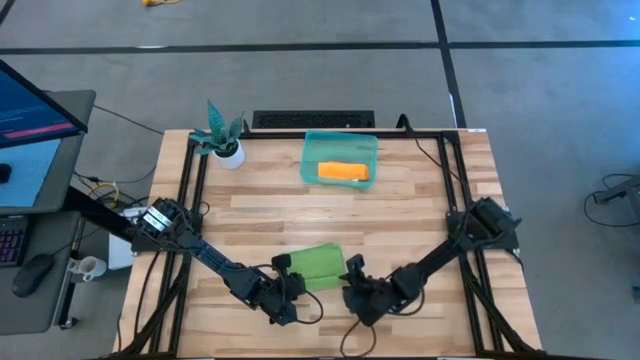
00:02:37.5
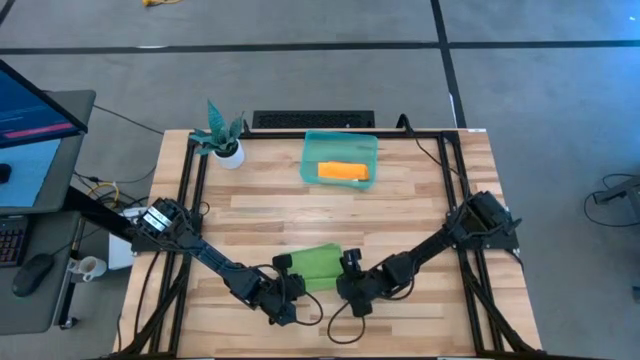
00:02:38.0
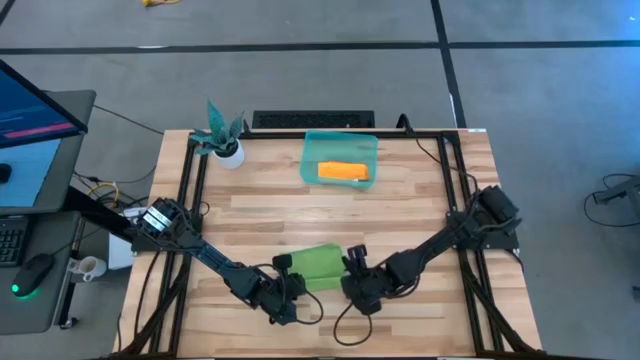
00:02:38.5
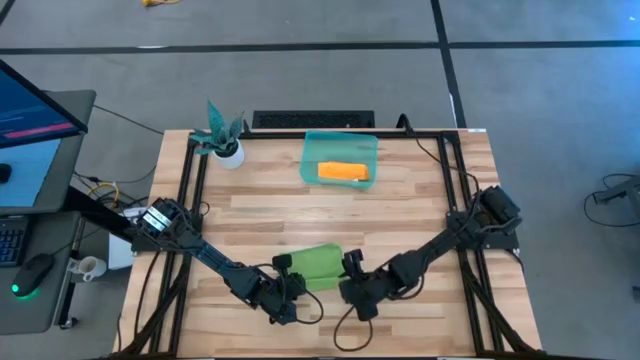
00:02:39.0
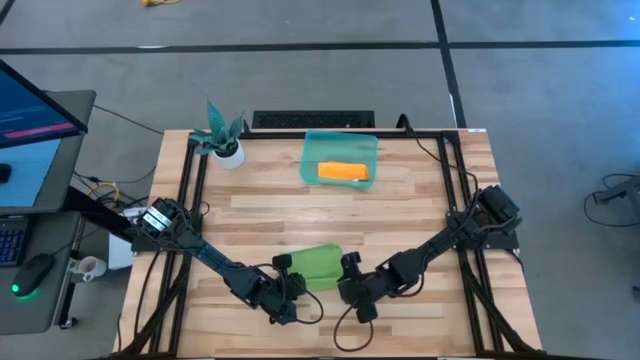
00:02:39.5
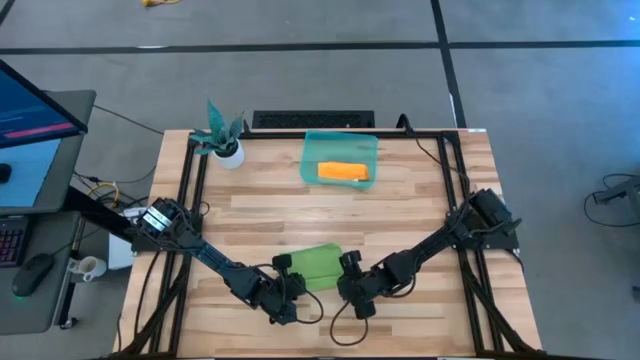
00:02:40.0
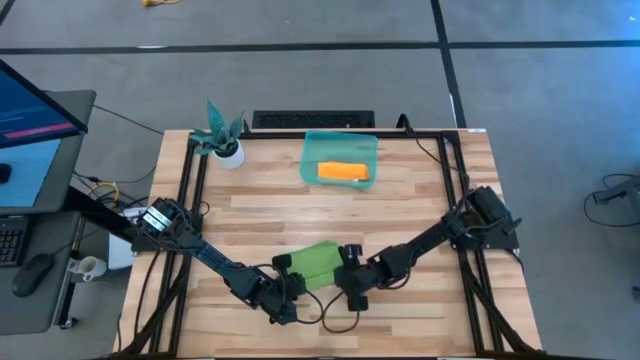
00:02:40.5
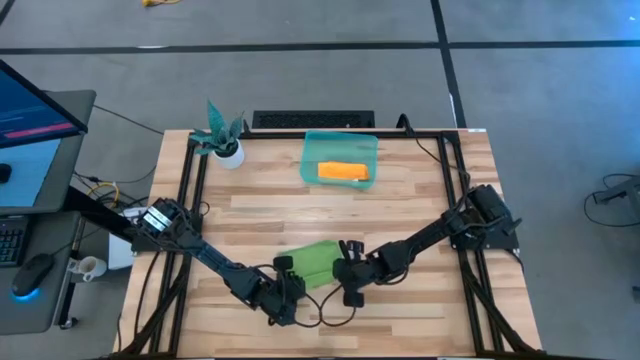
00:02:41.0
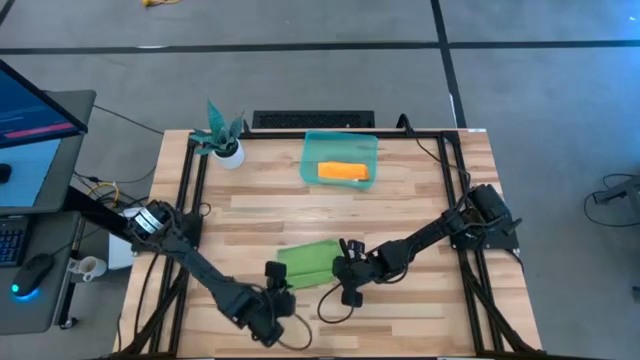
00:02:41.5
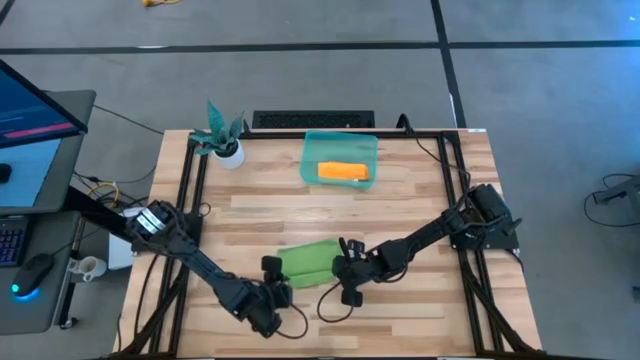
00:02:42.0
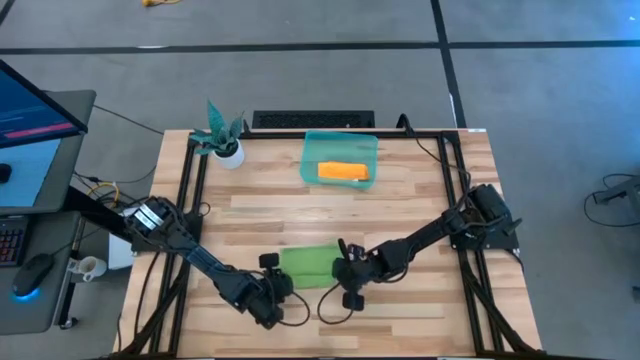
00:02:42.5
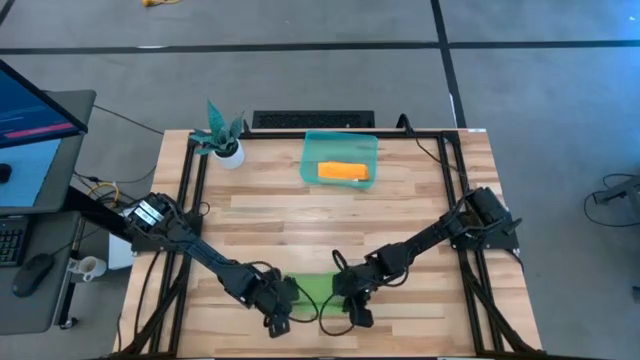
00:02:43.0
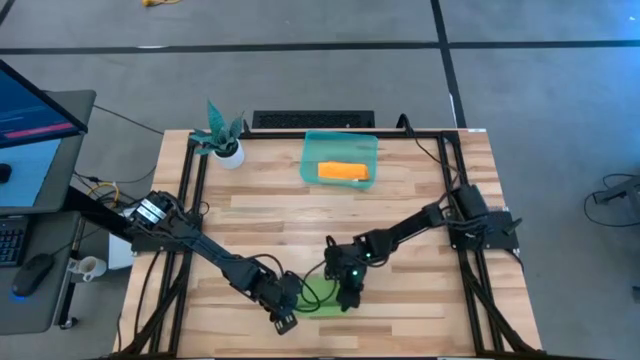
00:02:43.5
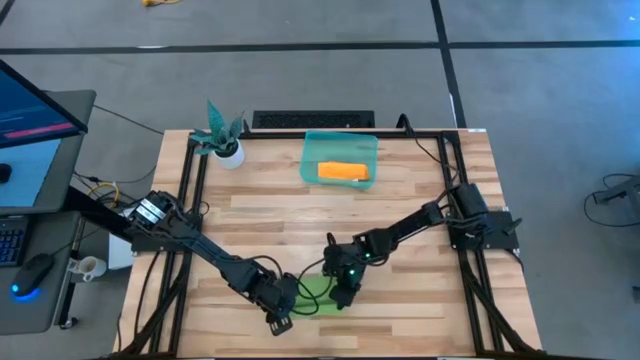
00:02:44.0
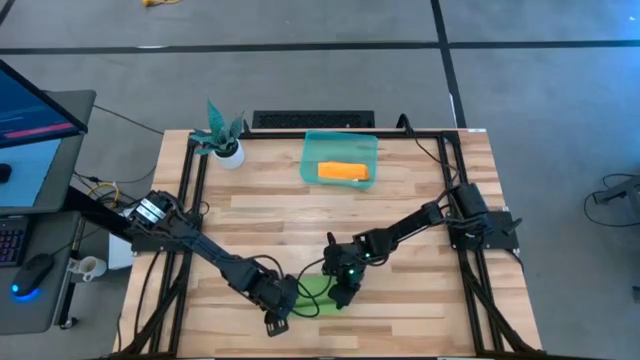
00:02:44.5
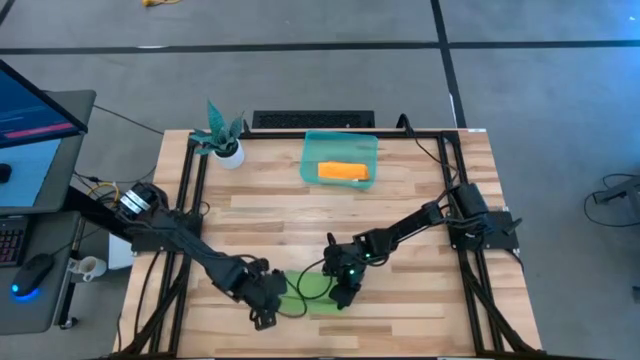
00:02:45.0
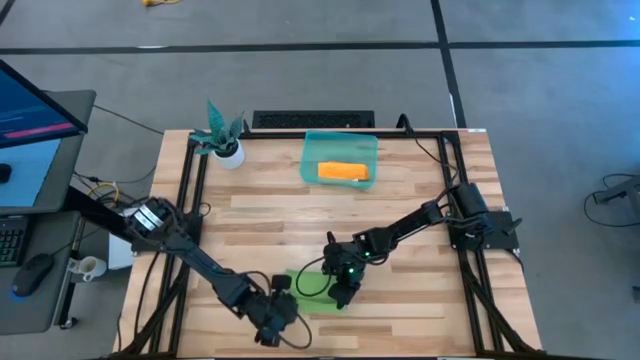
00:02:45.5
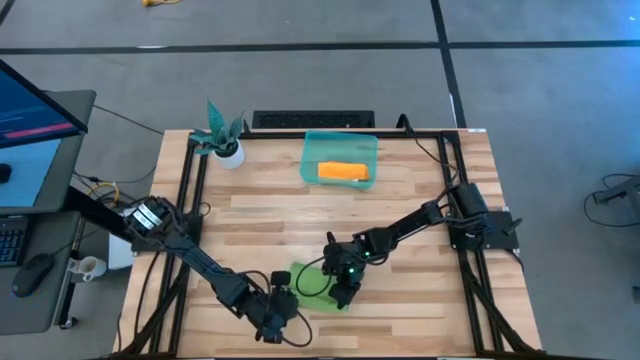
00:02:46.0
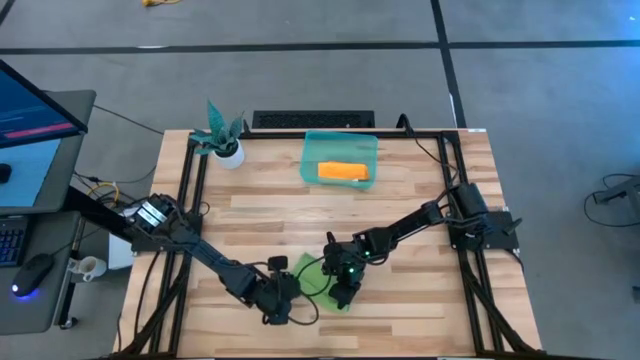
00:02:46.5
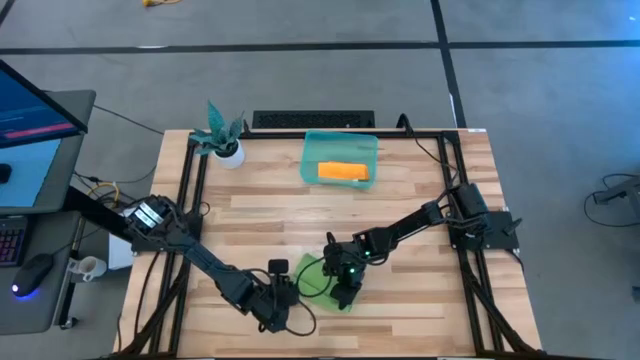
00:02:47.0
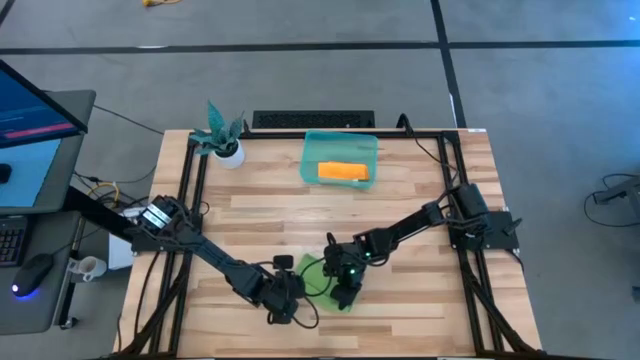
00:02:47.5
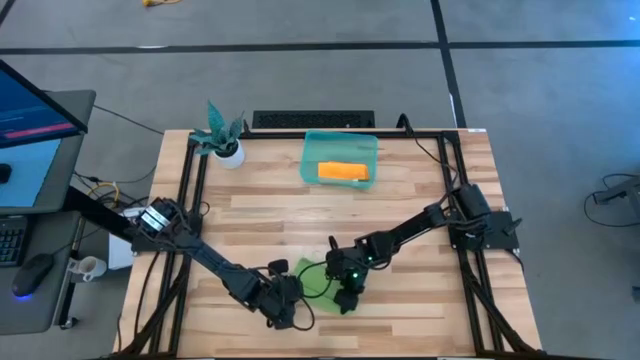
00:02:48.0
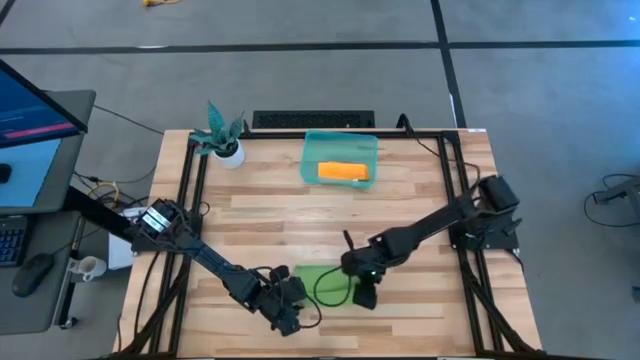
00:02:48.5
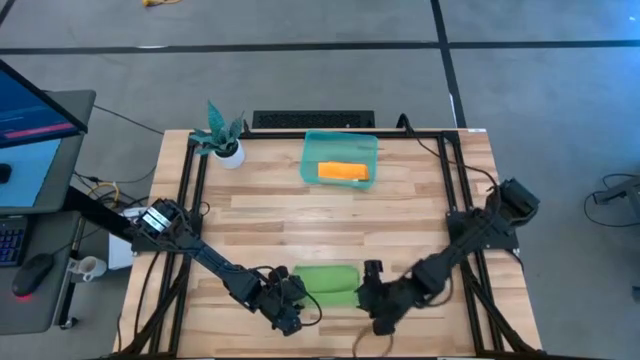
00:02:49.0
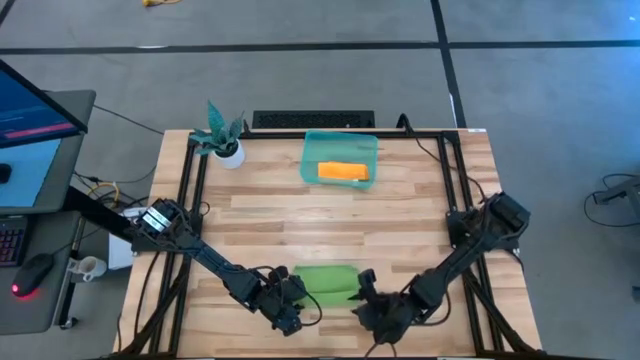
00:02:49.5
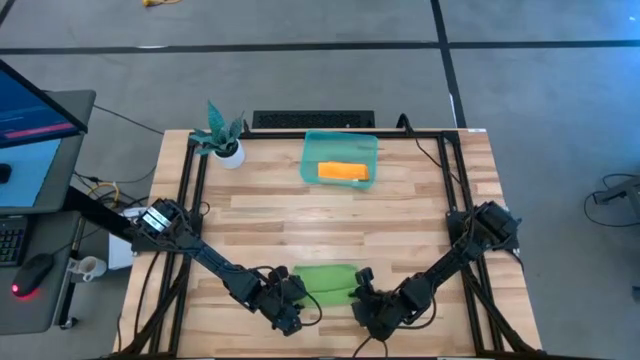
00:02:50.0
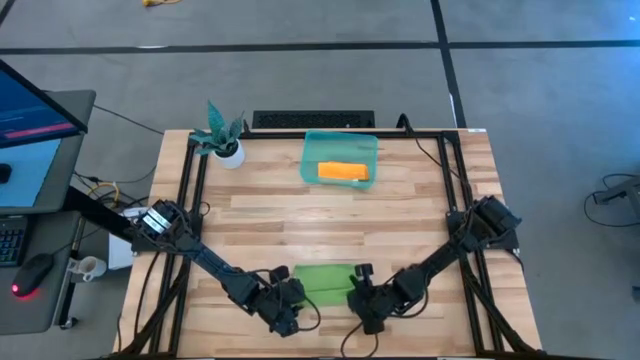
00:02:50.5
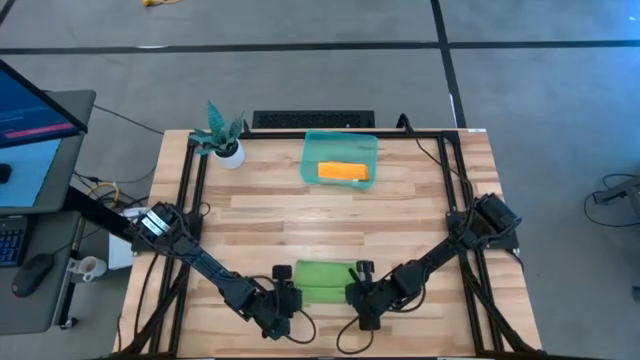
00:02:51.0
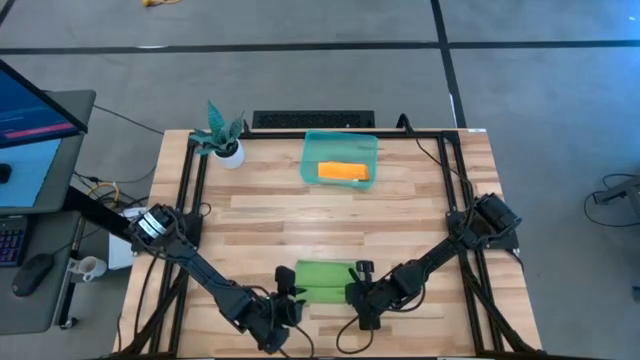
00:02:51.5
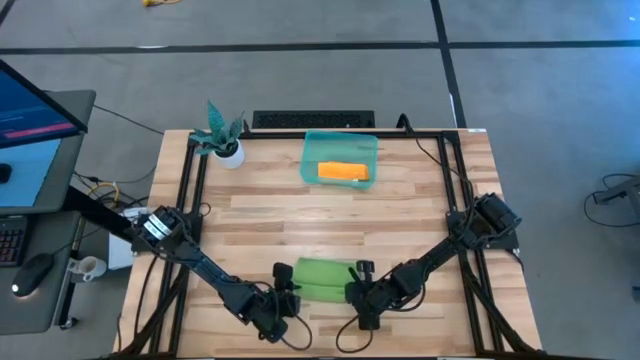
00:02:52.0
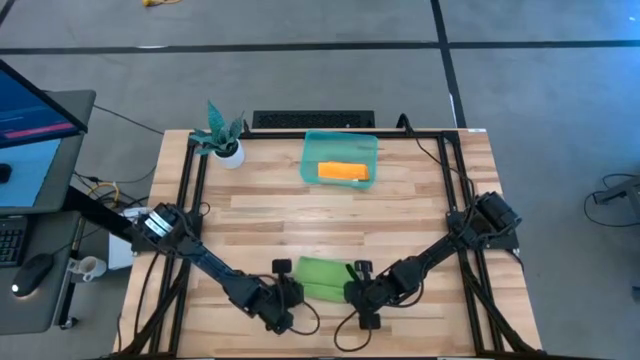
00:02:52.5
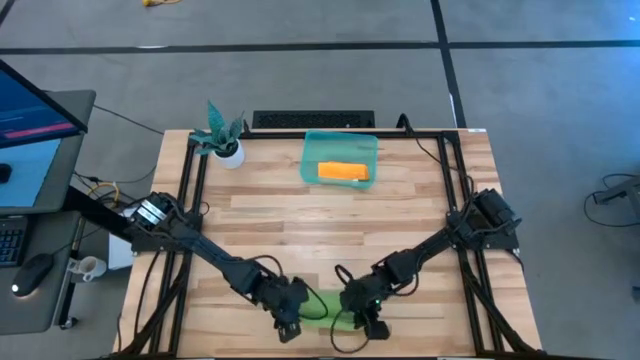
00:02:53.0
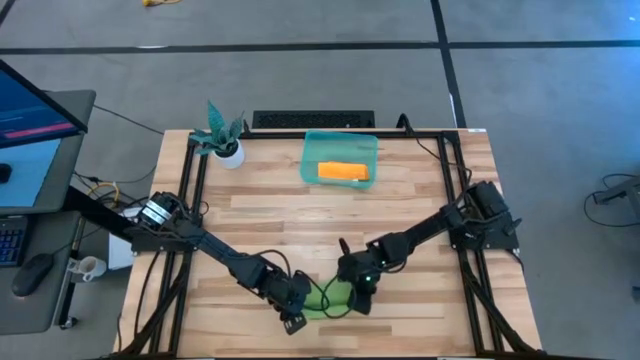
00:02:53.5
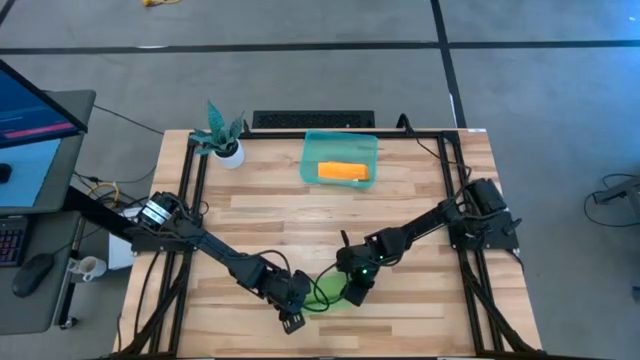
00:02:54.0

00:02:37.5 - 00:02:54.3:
Task: Roll microfiber towels into tight, uniform cylinder then place into a basket
Roll the green towel

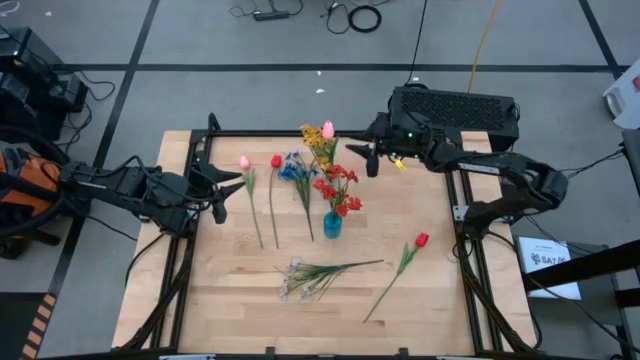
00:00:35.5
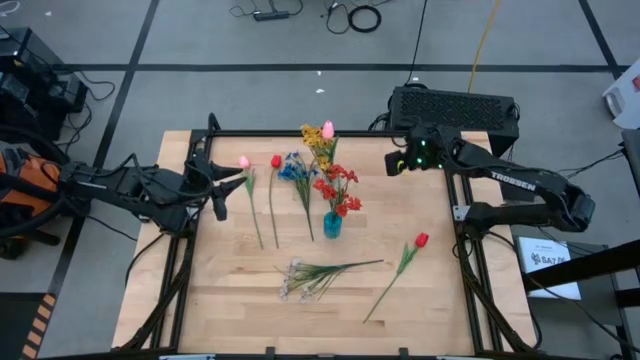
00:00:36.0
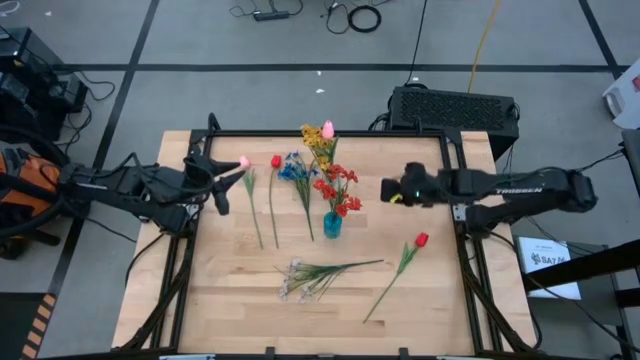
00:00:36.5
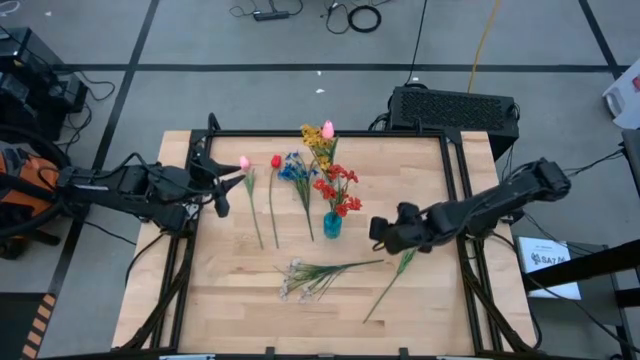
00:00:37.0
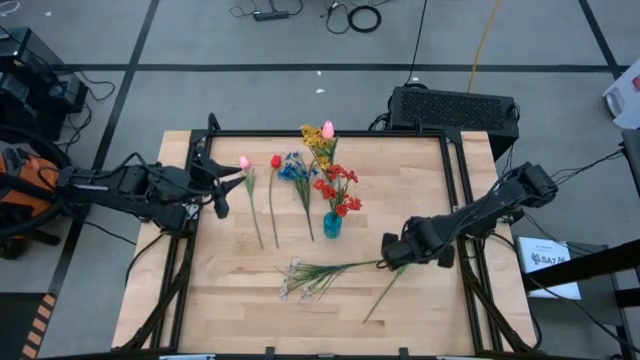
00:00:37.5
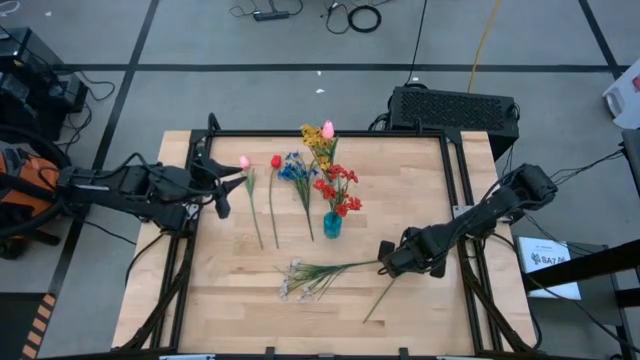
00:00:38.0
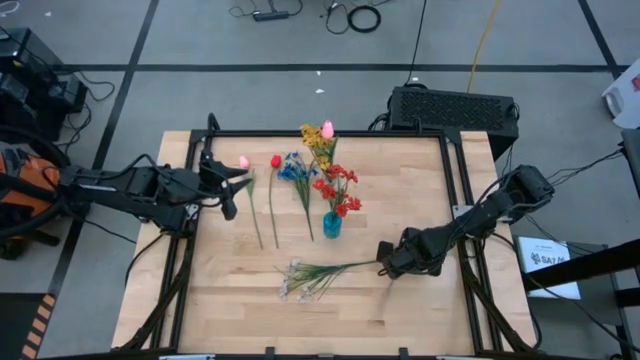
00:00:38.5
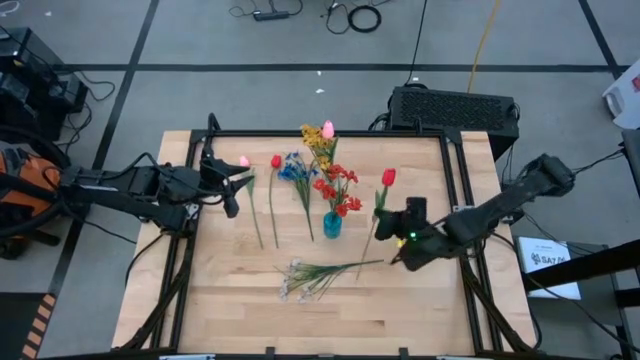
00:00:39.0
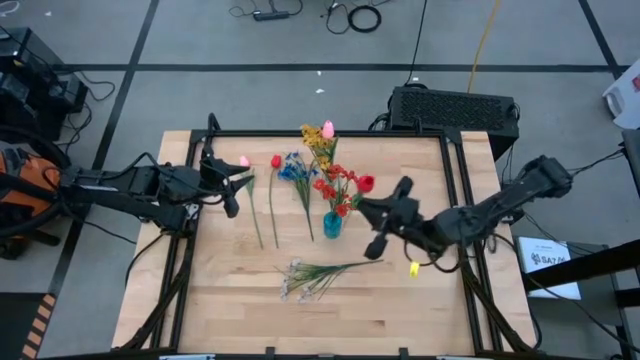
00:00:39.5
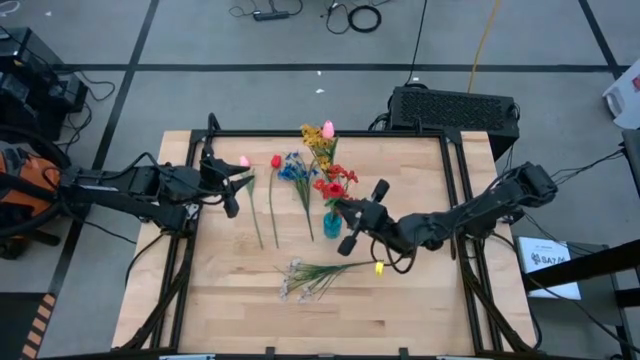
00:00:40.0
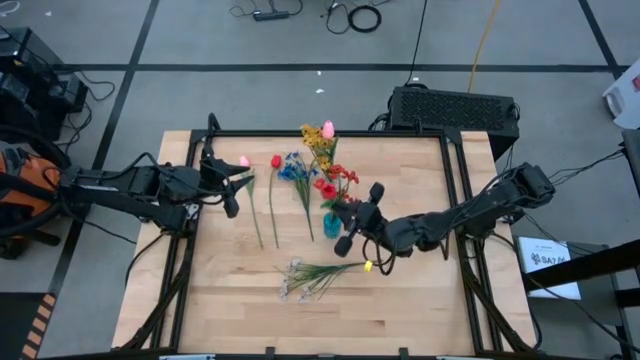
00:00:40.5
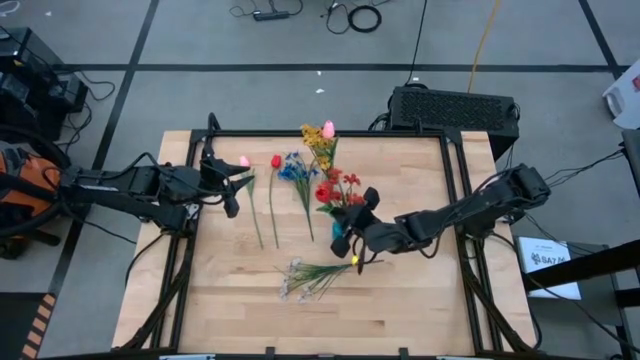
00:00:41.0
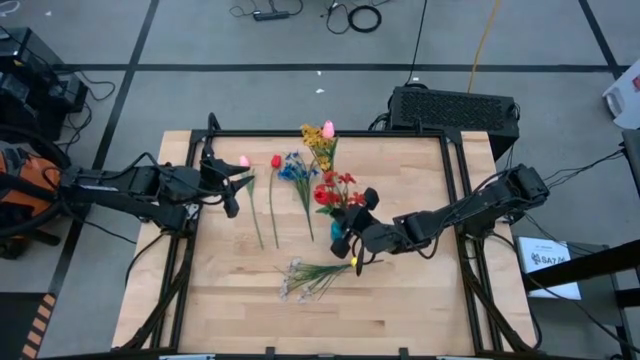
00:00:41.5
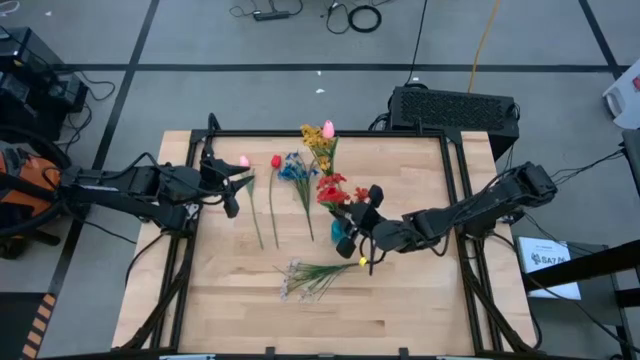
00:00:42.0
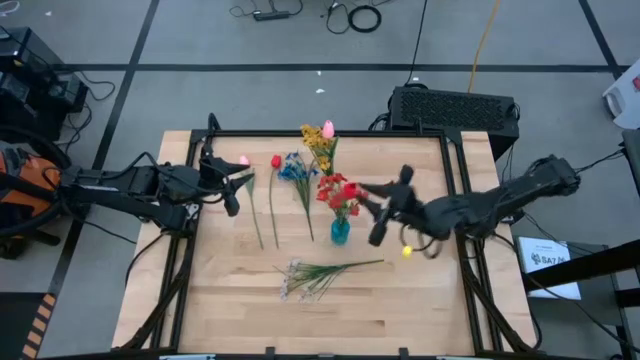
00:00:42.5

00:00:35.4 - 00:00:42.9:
Task: Sort flowers into vase by color
Put the right red tulip into the blue vase
